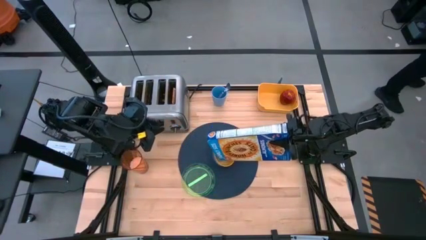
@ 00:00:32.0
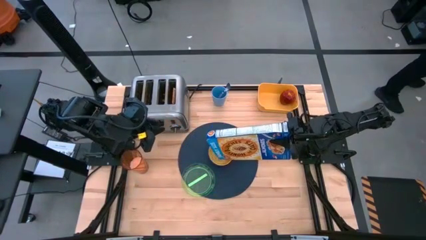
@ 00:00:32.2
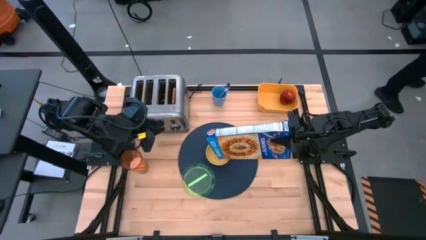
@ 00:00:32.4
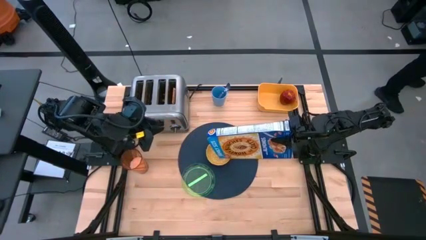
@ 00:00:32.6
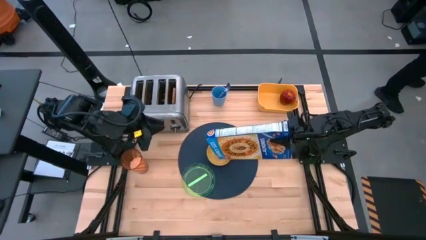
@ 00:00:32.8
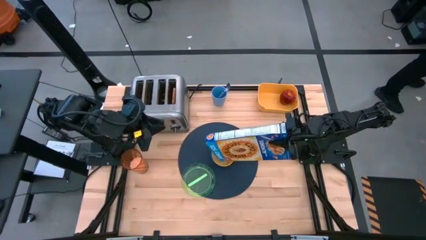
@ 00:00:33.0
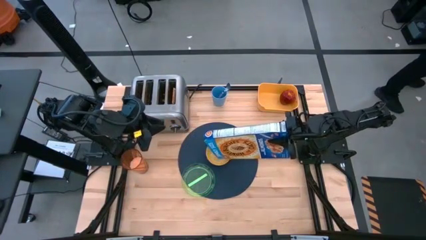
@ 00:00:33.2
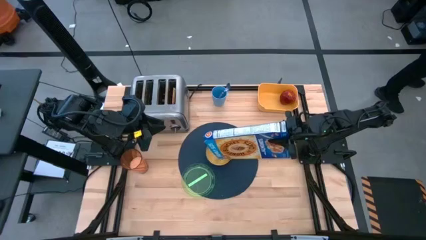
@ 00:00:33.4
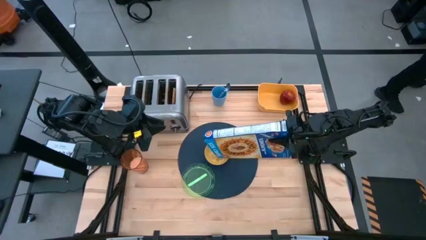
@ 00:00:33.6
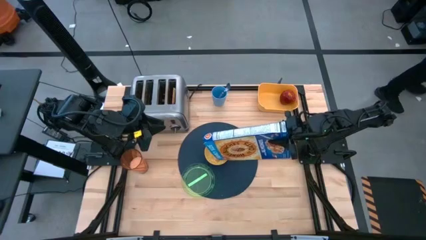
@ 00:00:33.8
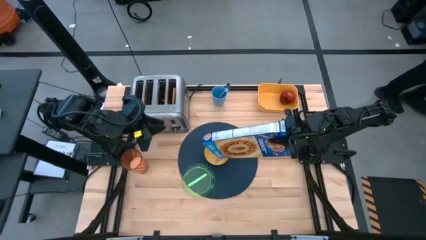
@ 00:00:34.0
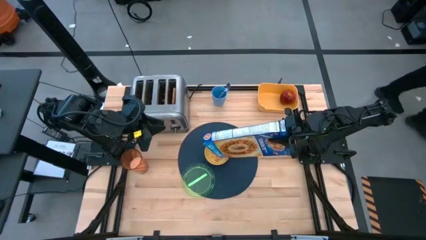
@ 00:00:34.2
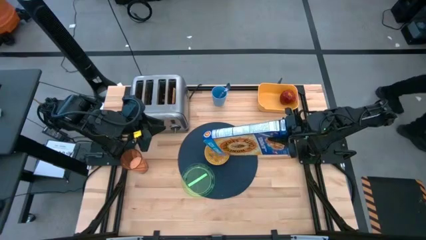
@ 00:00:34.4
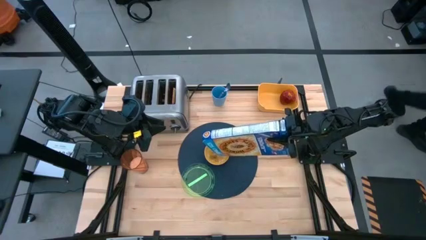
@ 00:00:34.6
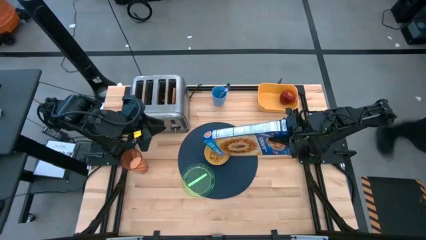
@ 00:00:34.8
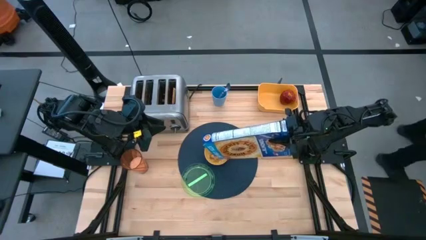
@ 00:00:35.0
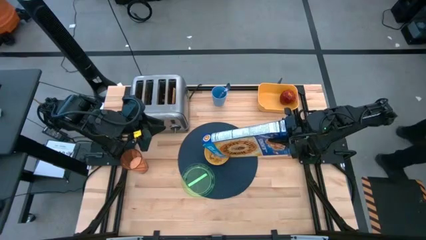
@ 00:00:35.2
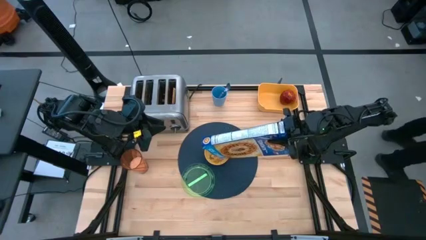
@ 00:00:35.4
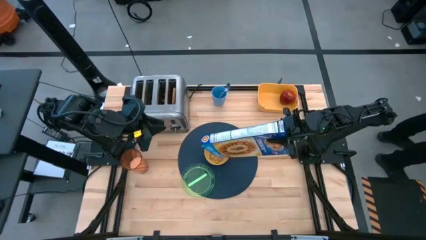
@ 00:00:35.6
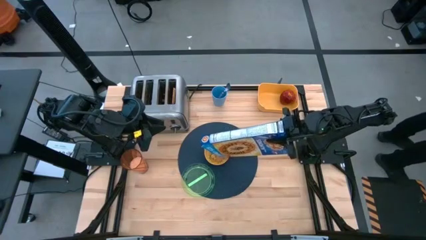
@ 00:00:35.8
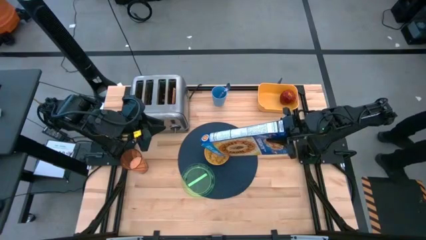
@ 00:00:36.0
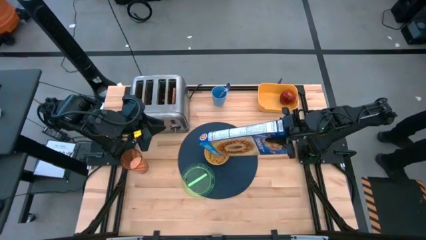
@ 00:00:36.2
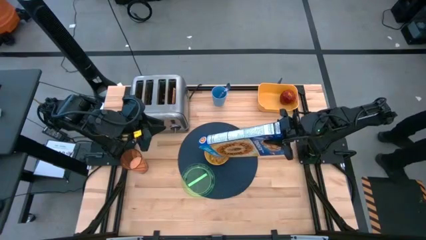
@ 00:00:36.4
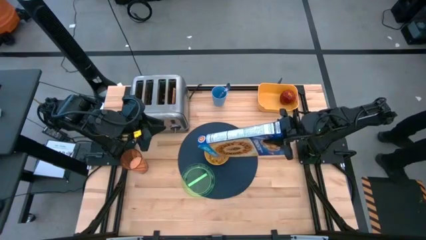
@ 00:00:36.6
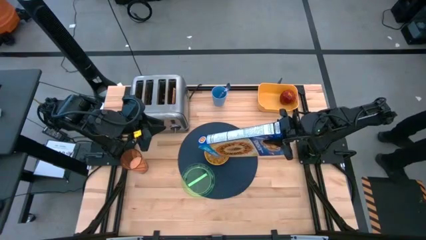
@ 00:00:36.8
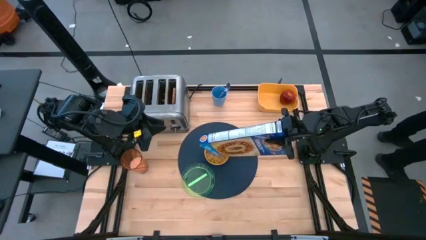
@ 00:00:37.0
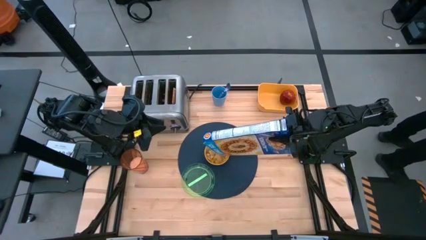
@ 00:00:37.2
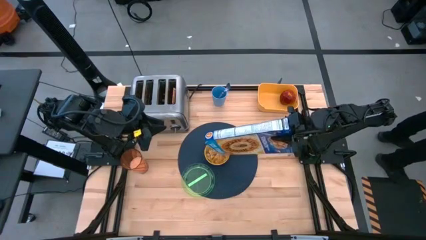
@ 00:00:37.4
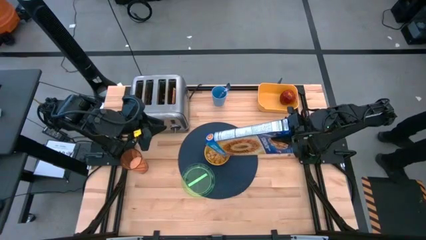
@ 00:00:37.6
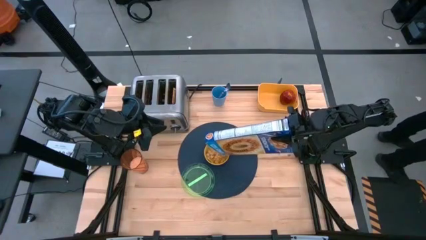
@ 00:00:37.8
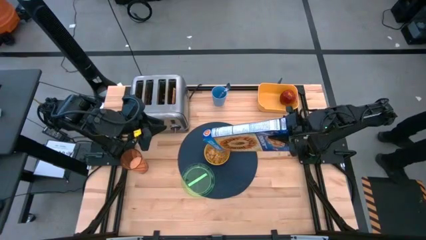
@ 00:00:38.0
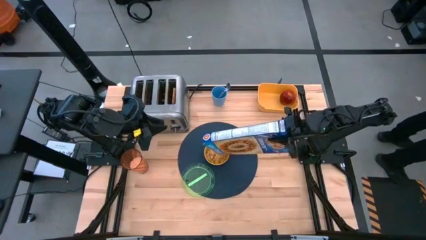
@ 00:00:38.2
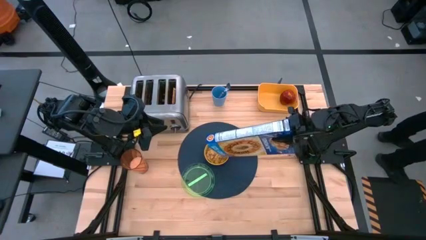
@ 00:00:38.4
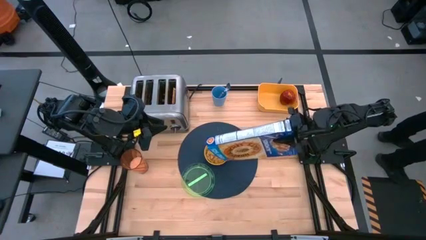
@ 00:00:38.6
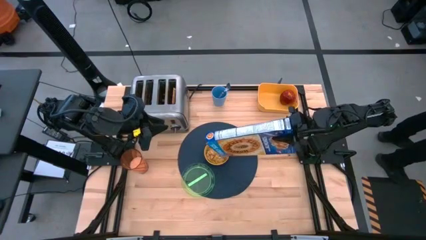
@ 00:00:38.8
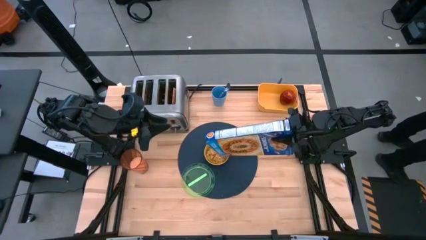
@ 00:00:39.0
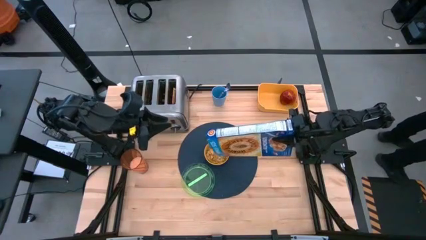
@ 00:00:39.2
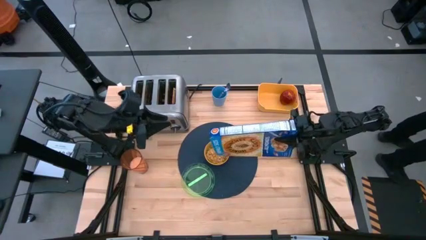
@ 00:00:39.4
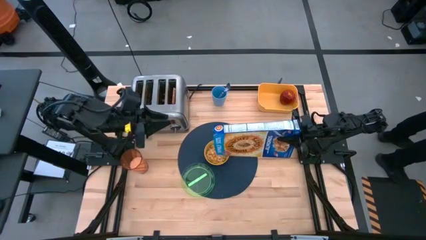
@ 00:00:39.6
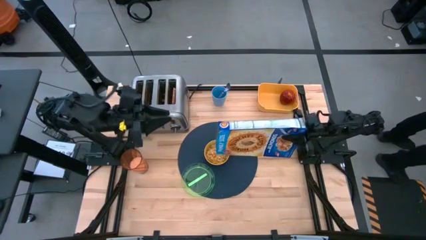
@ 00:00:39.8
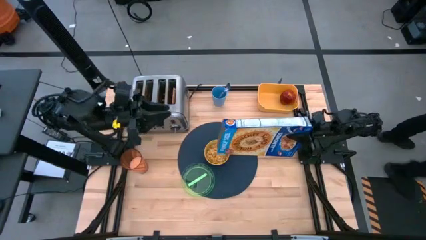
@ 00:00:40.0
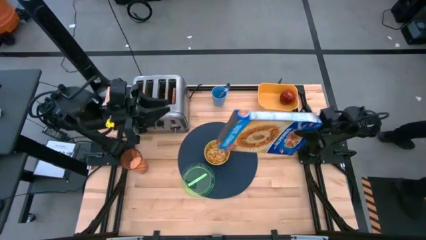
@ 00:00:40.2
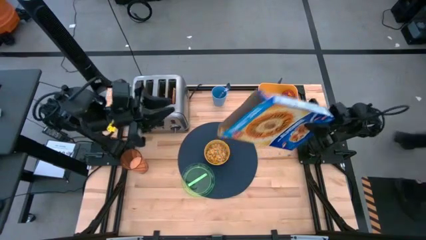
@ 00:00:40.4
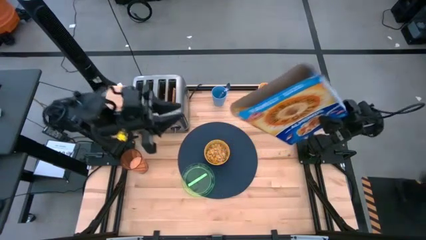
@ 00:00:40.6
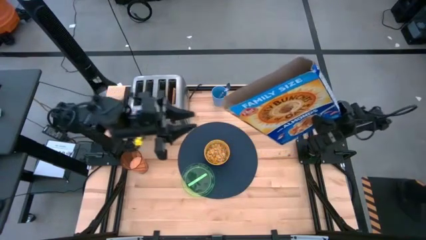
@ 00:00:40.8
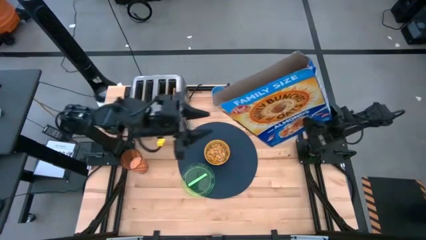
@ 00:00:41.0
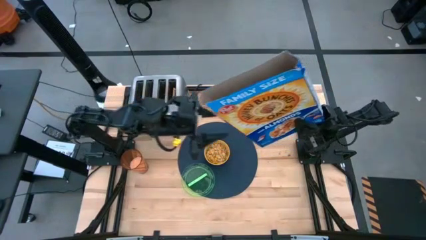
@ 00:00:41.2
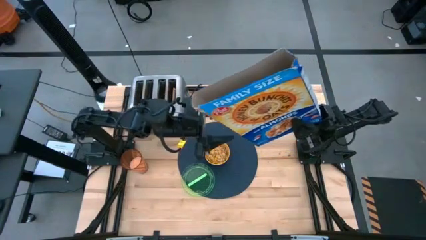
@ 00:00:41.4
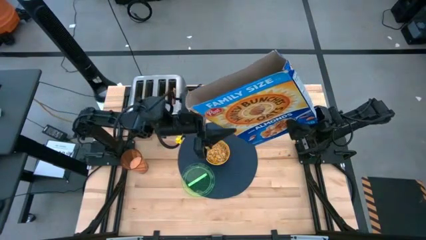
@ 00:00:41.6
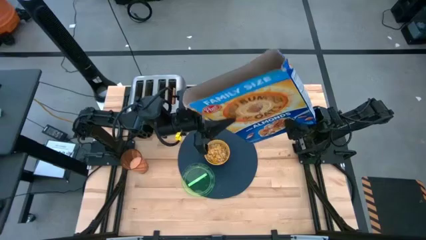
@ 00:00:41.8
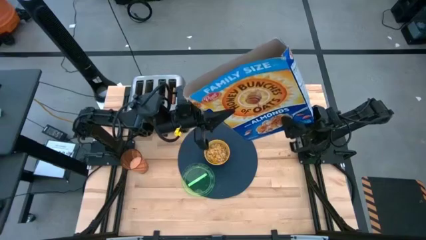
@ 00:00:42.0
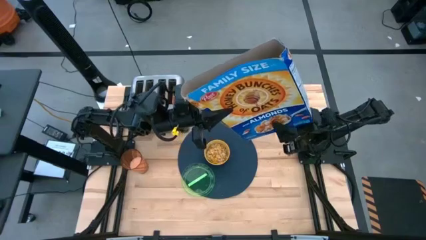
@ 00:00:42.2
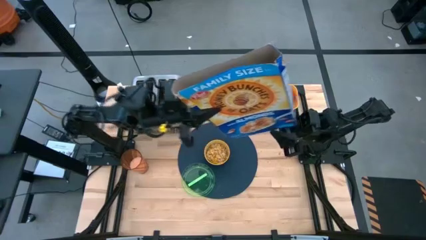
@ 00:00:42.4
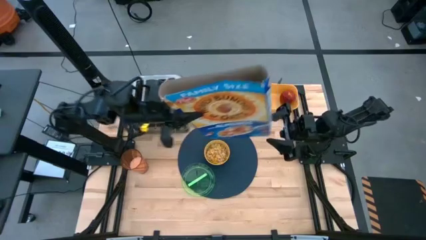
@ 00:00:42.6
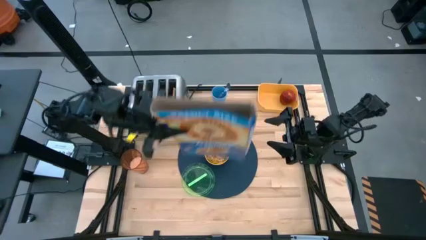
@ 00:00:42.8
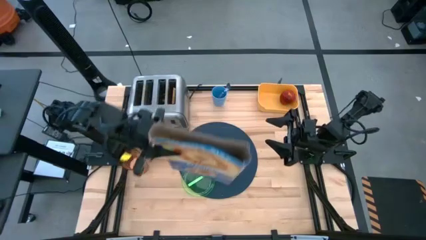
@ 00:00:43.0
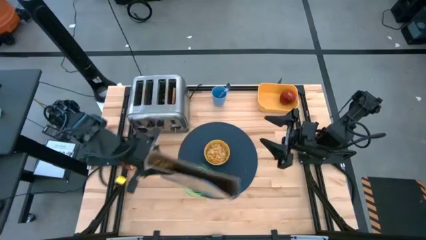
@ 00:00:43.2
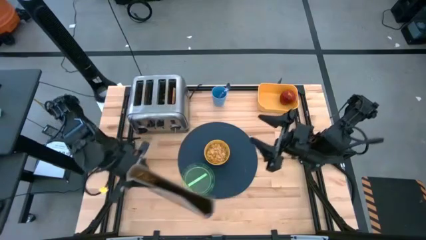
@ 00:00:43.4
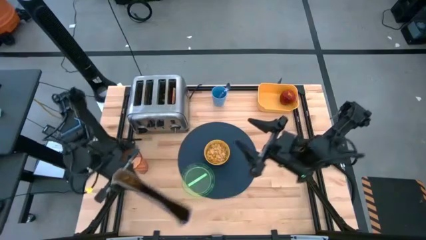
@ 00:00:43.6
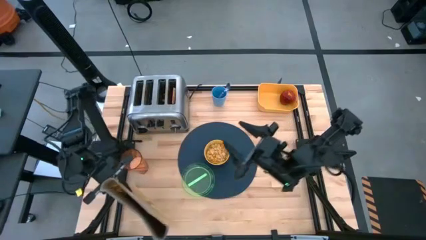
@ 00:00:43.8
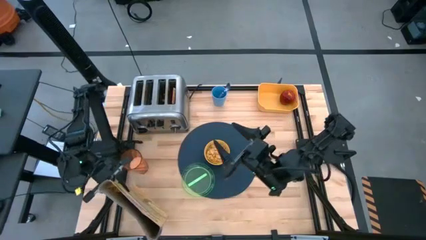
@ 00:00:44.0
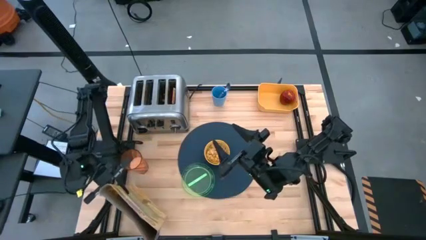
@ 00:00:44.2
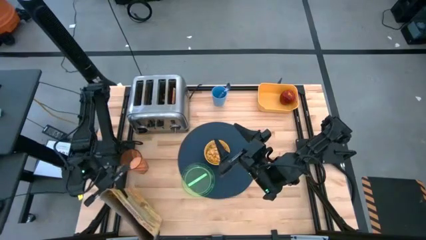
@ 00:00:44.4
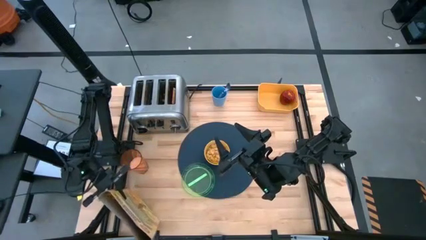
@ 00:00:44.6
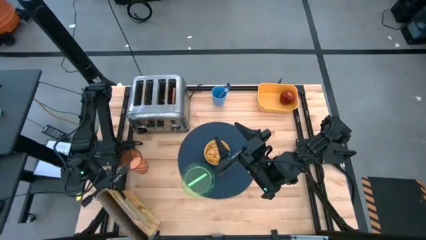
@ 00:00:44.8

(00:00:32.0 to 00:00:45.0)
Task: Arrange a breakfast setting
Pour the cereal from the box into the yellow bowl on the placemat

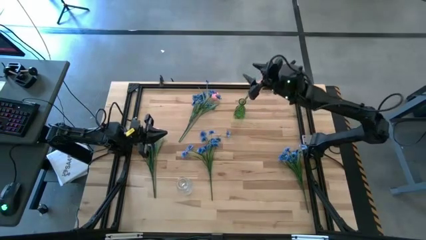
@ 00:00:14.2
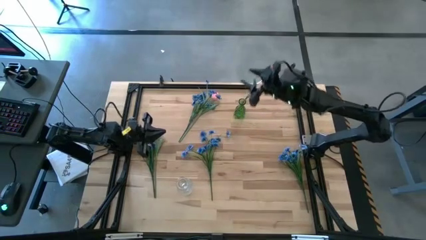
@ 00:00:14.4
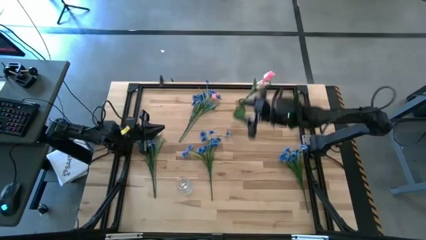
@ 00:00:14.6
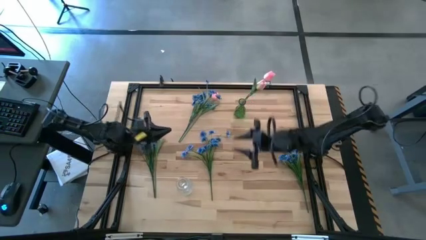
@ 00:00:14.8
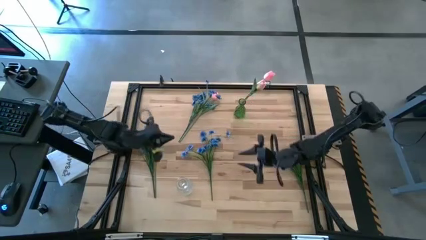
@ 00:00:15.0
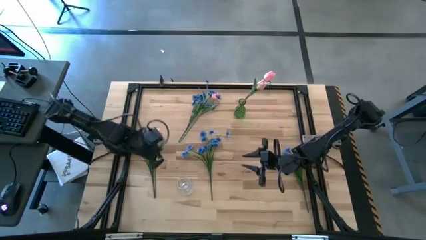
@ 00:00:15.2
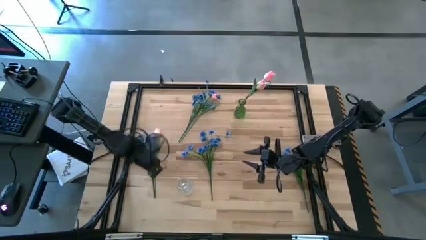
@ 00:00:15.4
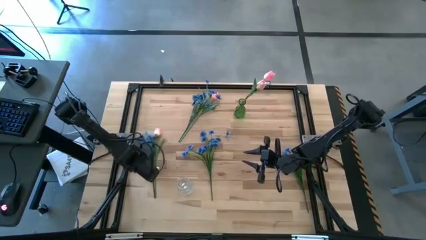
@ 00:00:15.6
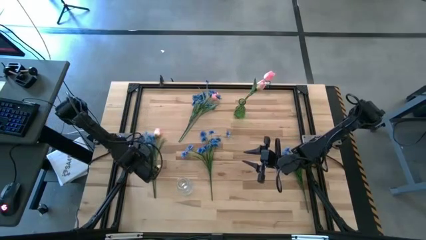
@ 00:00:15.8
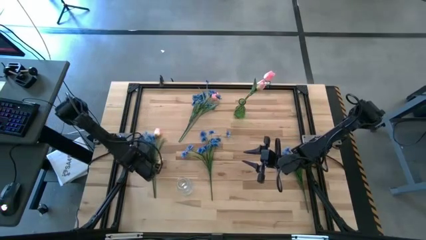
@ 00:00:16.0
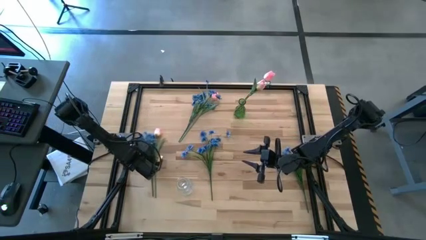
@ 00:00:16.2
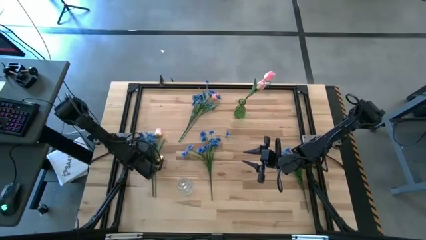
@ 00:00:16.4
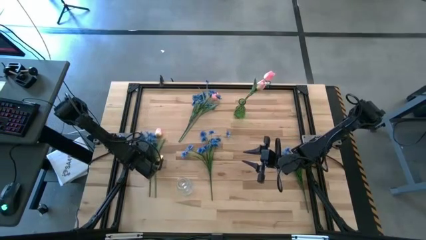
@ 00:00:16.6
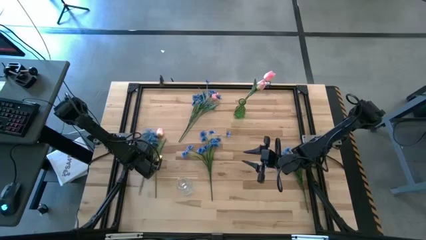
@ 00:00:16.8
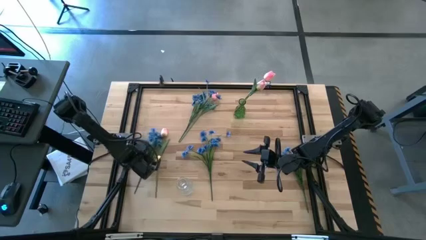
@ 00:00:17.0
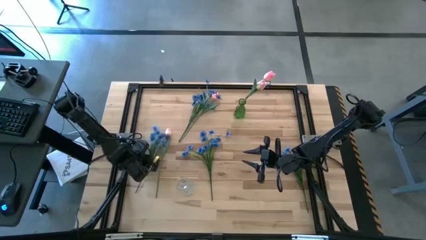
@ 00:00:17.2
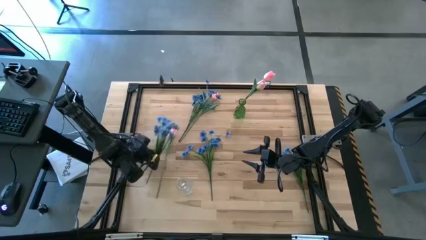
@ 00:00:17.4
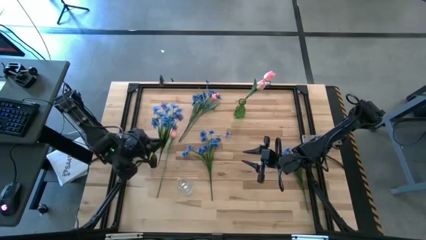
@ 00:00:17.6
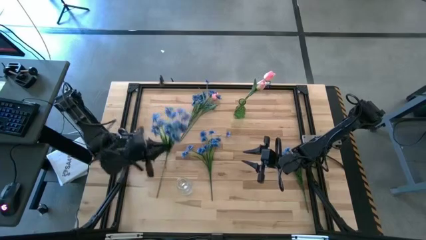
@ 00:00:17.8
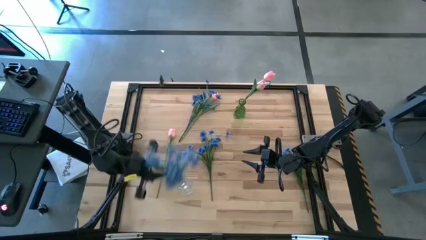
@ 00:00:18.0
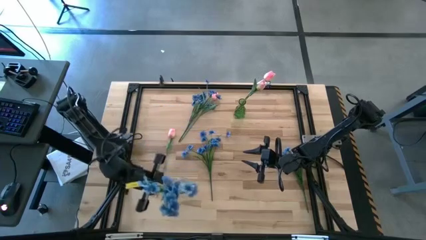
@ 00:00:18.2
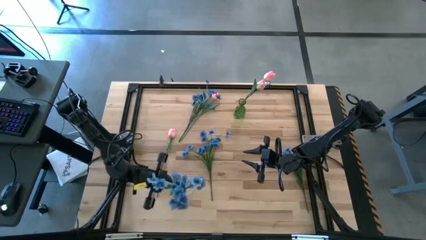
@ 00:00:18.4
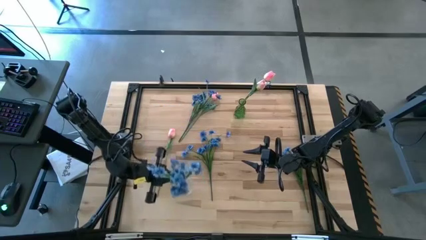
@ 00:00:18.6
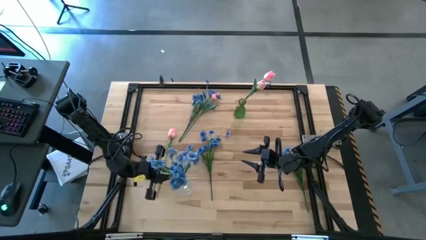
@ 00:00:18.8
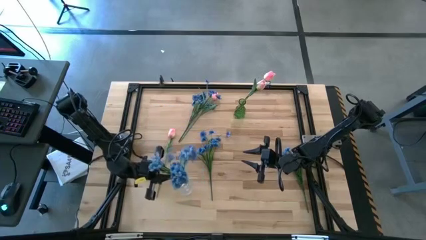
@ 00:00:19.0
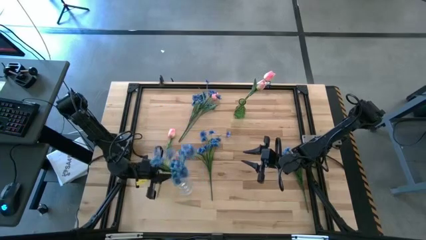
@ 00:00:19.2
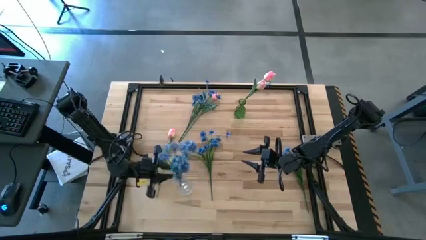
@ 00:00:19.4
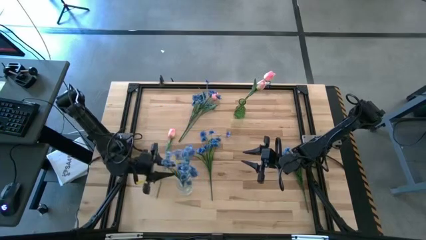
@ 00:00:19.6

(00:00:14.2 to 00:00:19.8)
Task: Sort flowers into vase by color
Put the blue flowers into the transparent vase
